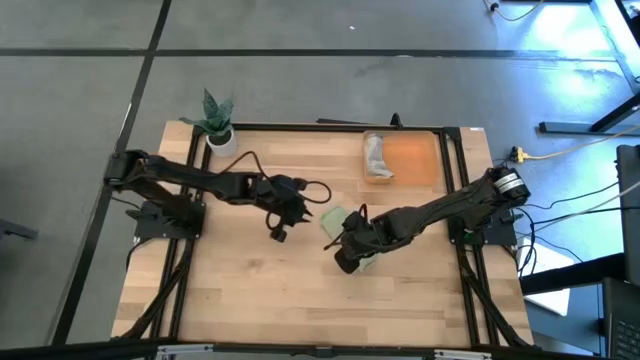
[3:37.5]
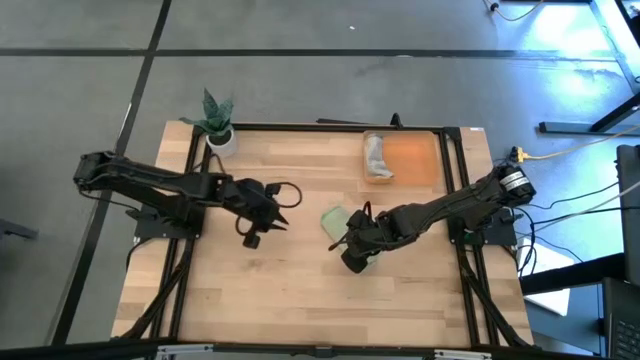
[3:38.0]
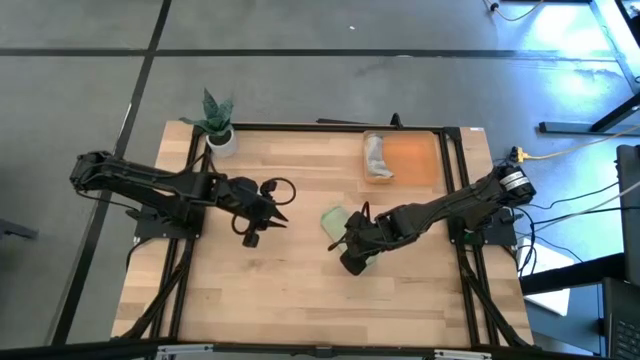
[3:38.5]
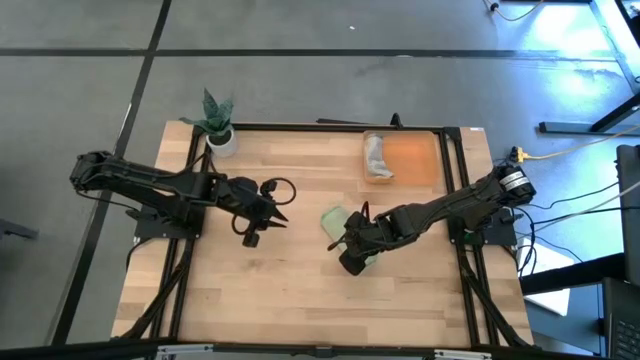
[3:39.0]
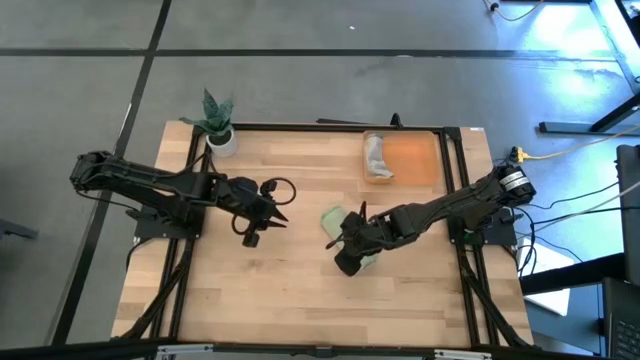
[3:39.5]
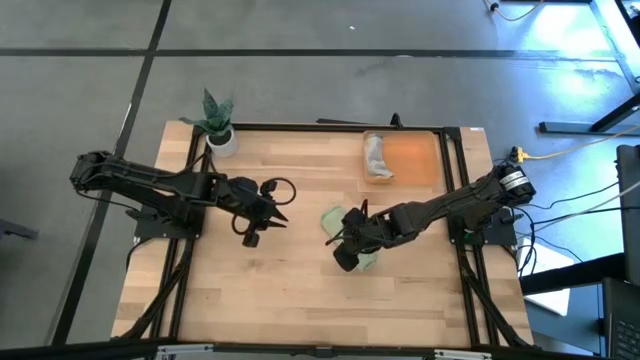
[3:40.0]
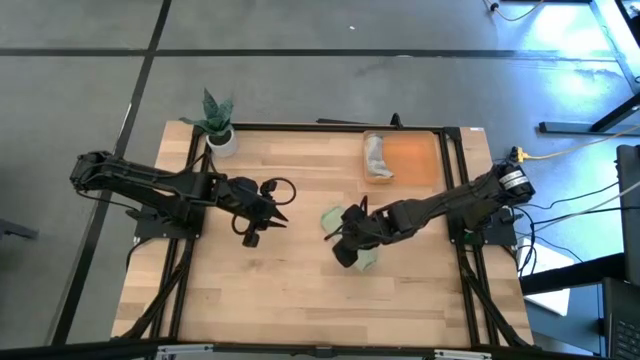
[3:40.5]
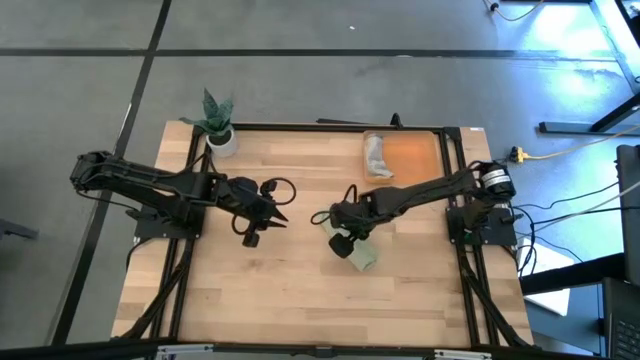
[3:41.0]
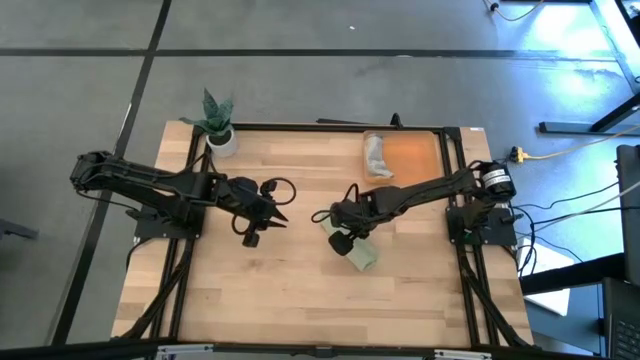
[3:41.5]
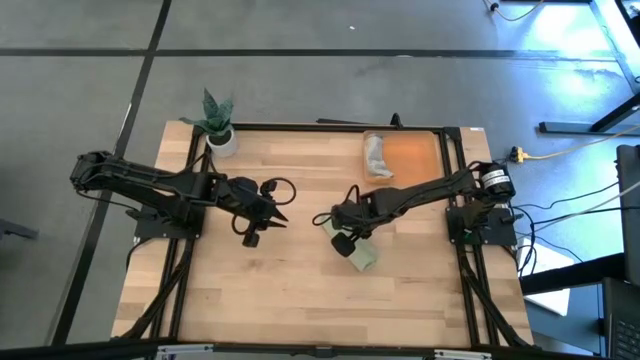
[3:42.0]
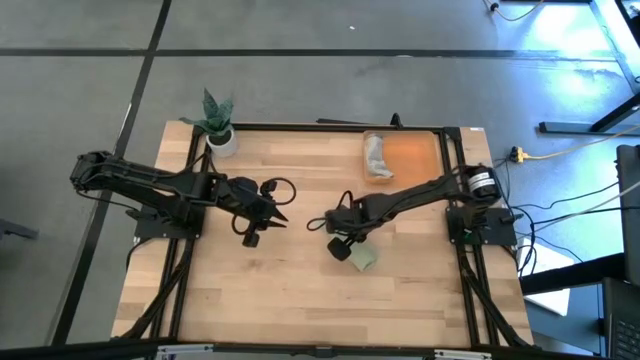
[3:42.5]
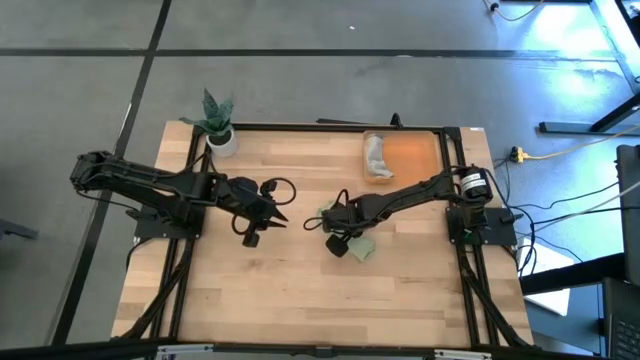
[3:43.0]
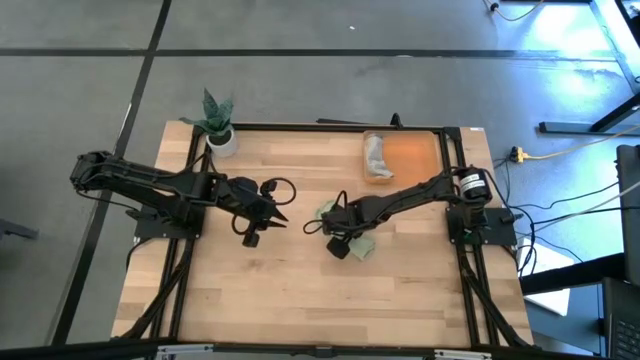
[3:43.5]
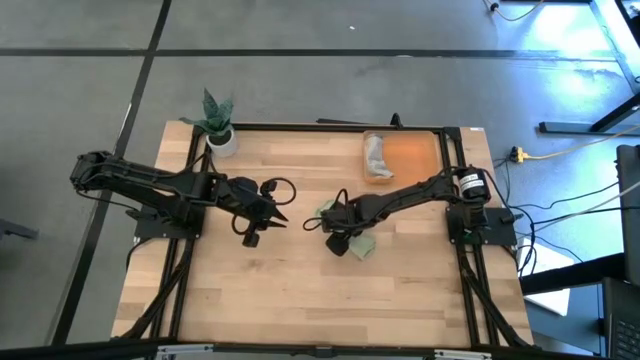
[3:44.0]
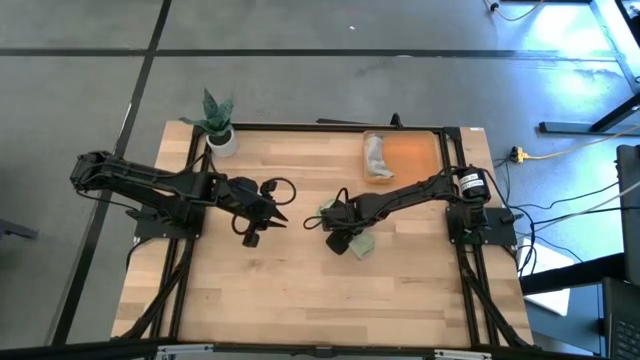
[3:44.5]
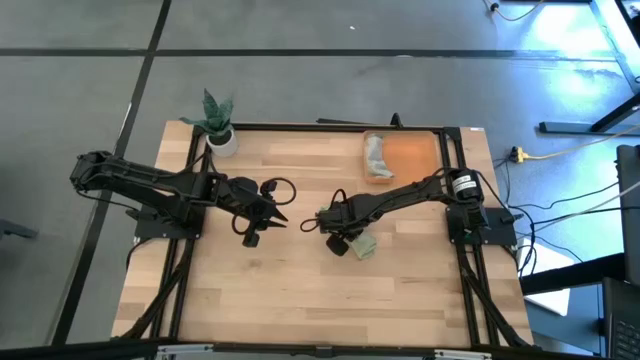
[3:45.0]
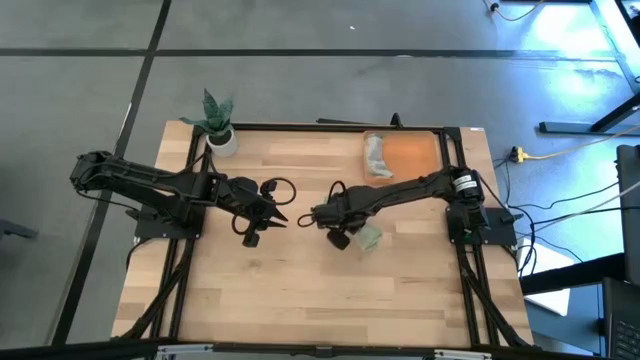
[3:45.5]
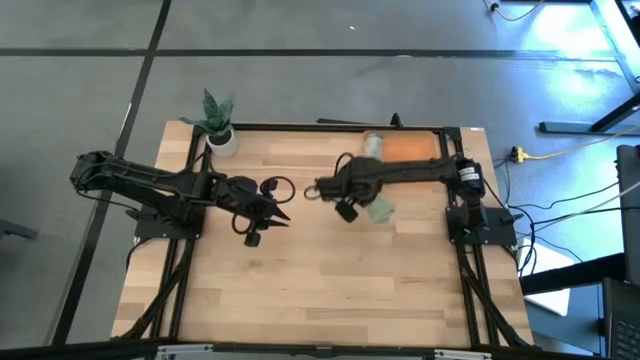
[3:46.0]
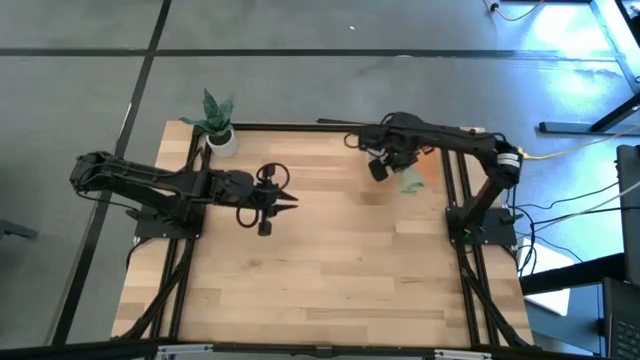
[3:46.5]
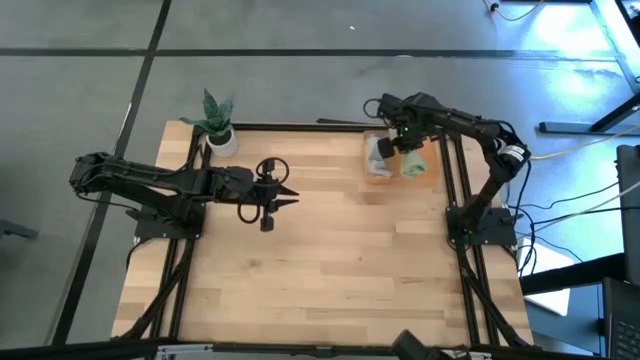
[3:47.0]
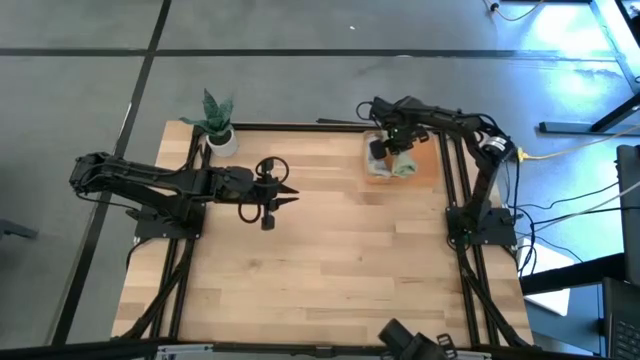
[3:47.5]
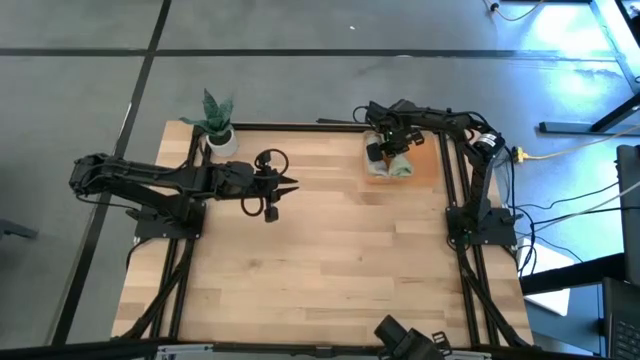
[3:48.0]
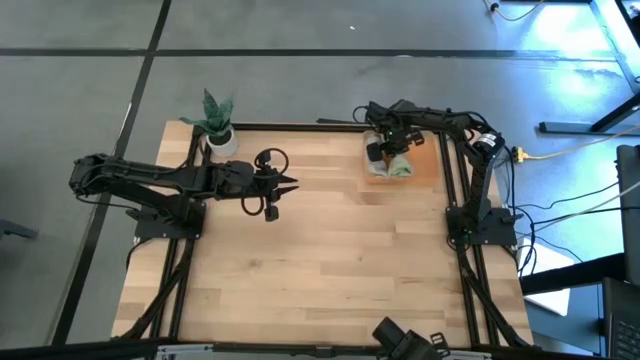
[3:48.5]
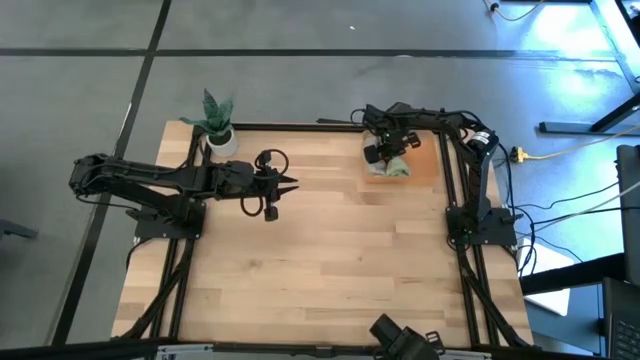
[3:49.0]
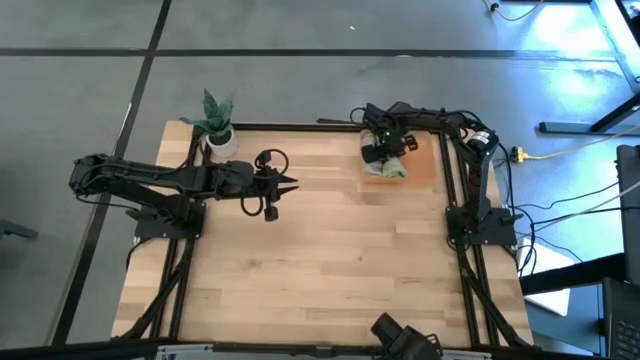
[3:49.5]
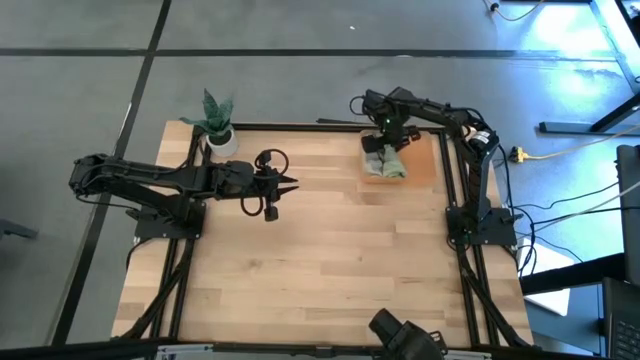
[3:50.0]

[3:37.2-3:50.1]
Task: Roll microfiber towels into tight, uniform cylinder then place into a basket
Put the green microfiber towel into the orange bin

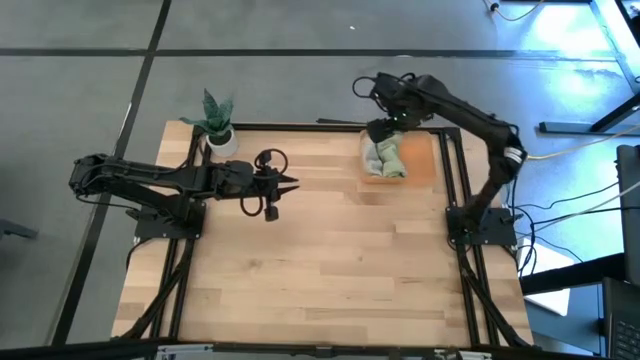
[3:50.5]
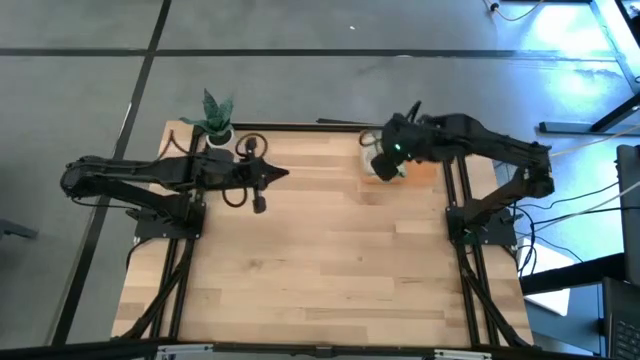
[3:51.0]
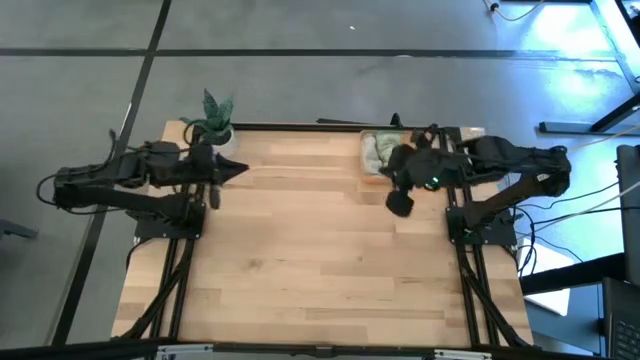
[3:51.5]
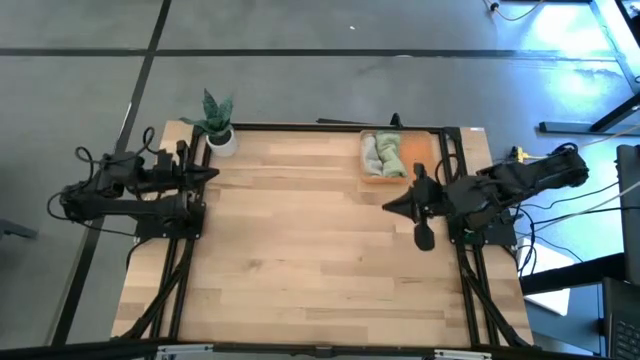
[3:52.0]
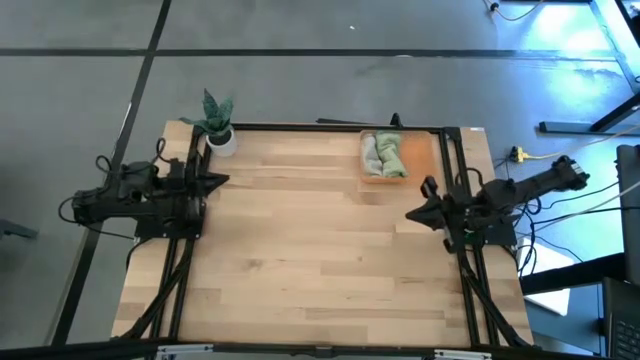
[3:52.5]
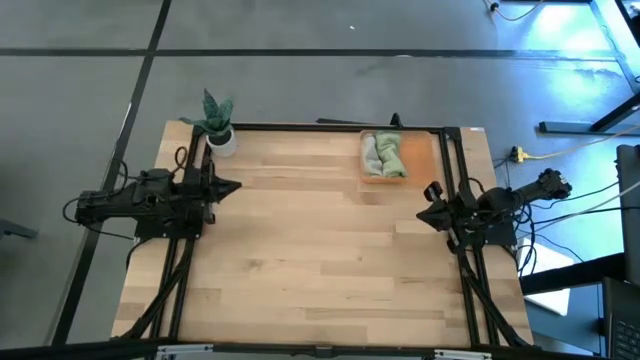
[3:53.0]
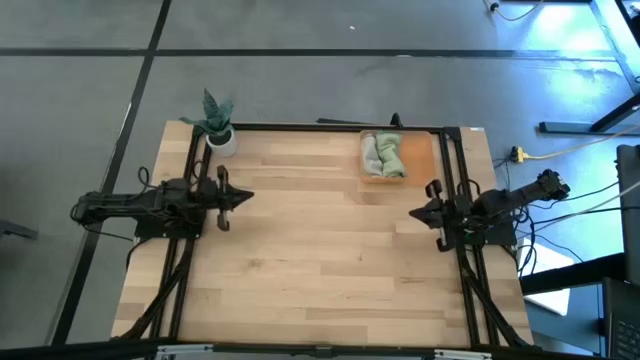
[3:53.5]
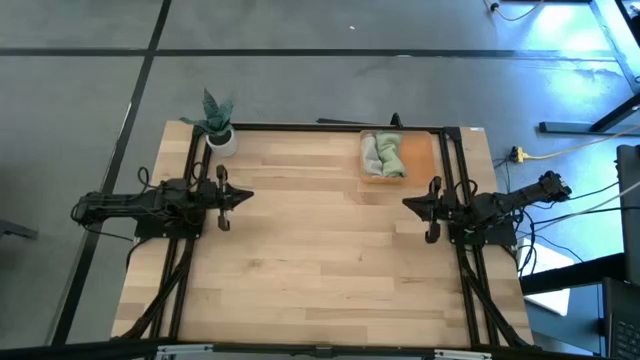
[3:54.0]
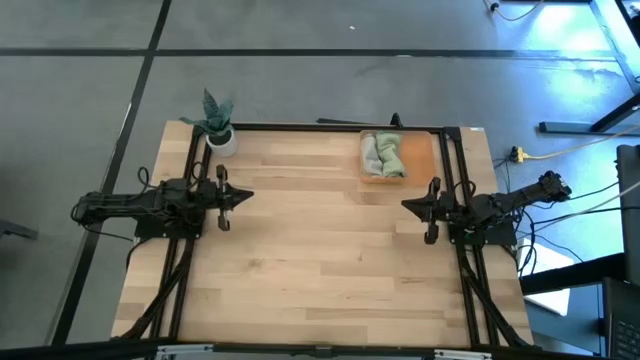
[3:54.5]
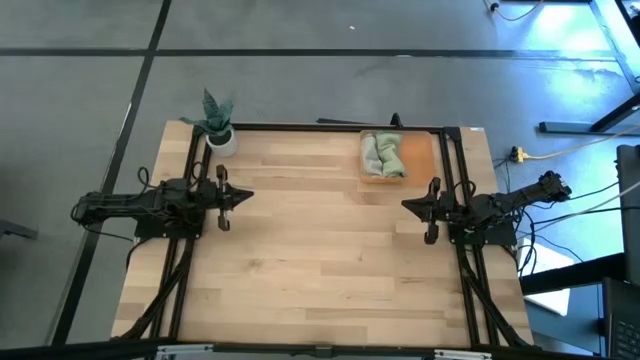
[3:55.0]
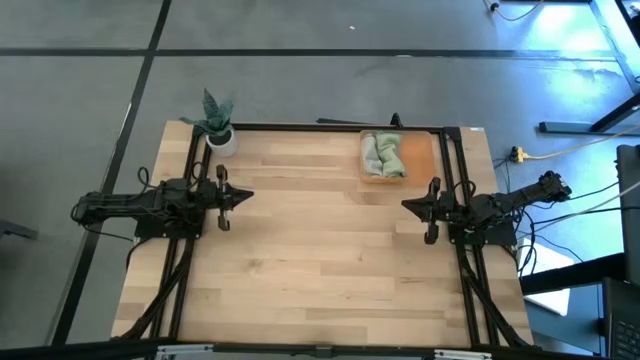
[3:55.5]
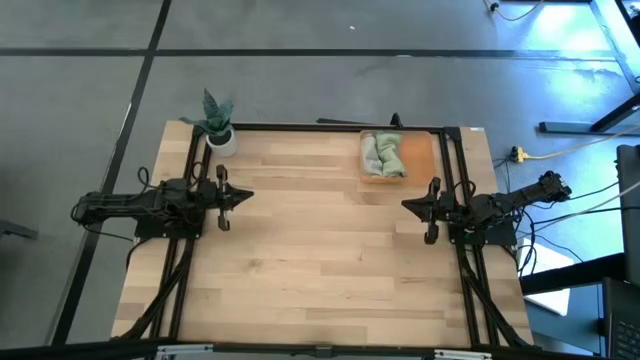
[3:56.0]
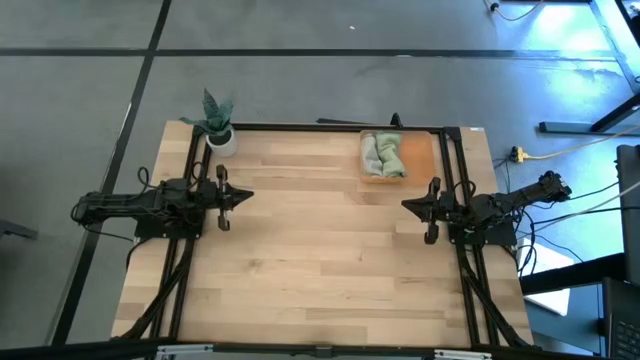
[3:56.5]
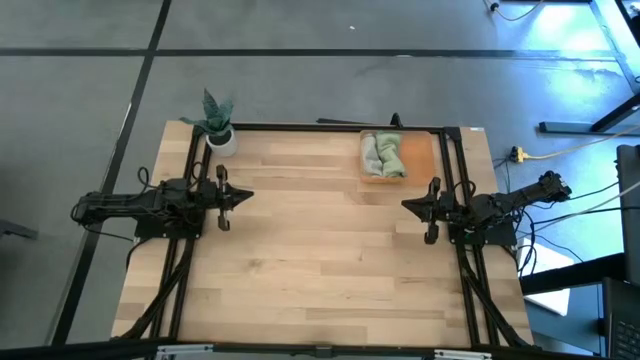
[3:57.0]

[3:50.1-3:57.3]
Return to Home Position

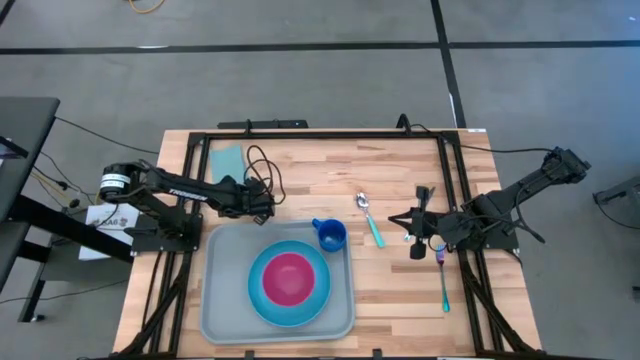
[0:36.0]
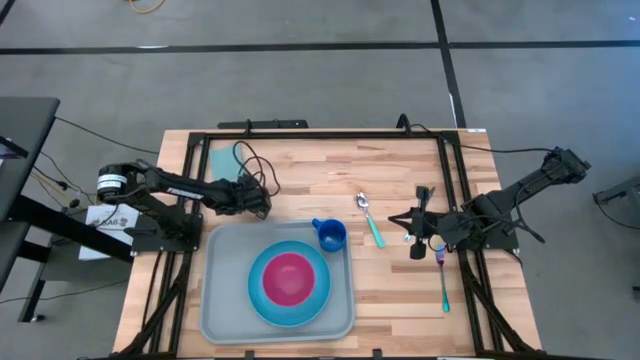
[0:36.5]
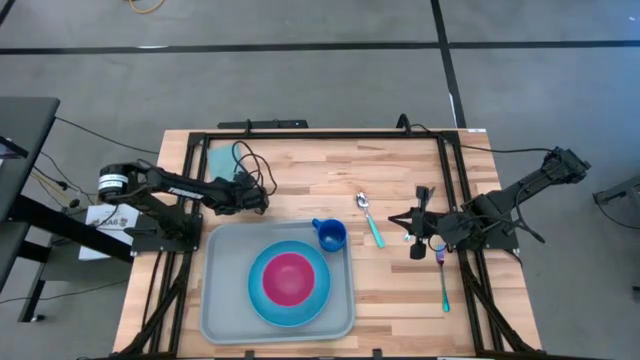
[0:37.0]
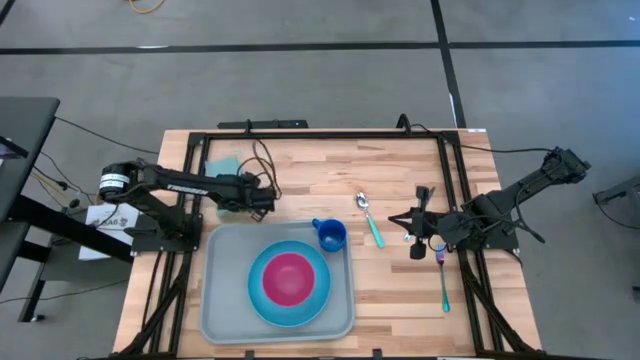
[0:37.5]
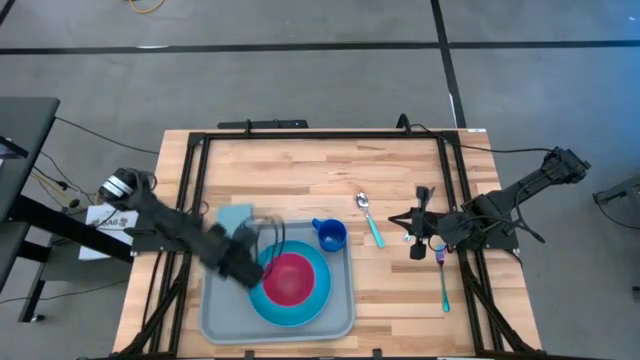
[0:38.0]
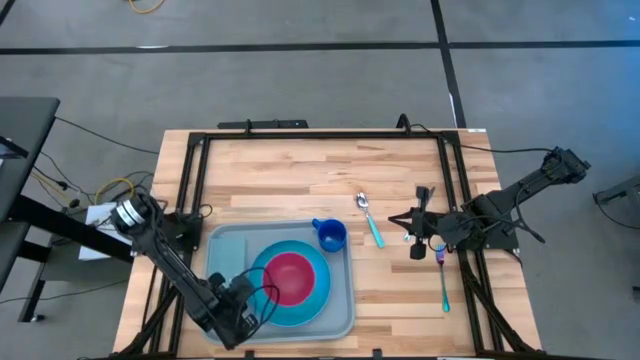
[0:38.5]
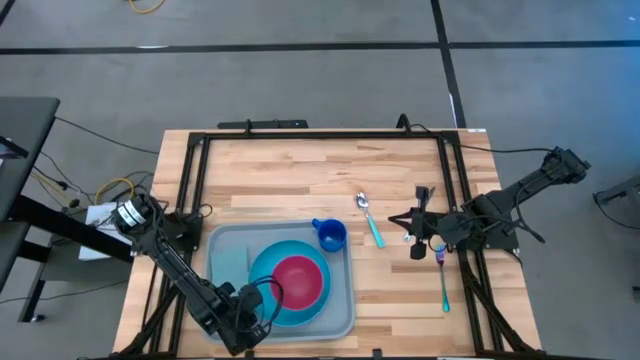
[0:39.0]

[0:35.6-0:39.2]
Task: Set up tray
Put the blue napkin beside the blue plate on the gray serving tray
